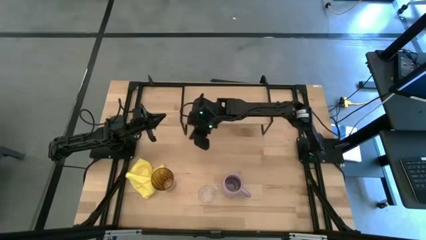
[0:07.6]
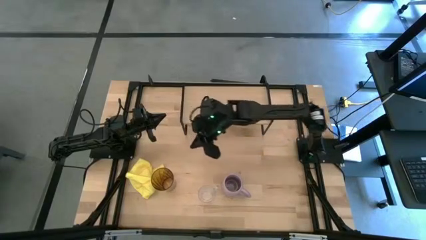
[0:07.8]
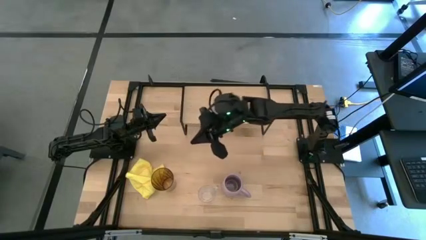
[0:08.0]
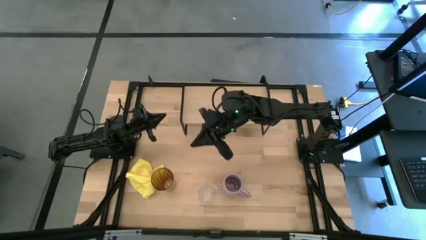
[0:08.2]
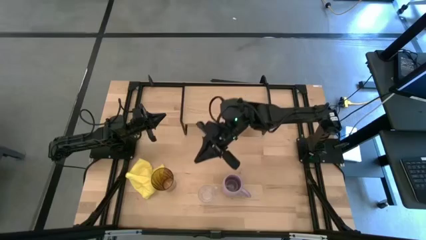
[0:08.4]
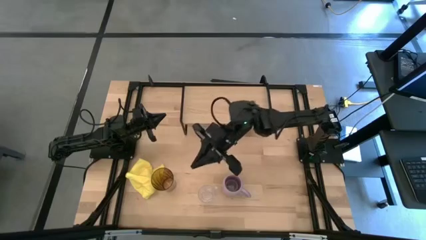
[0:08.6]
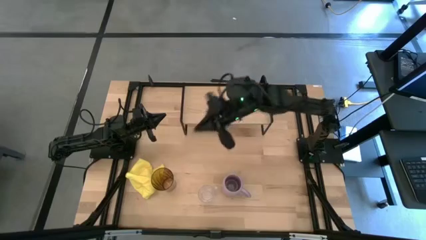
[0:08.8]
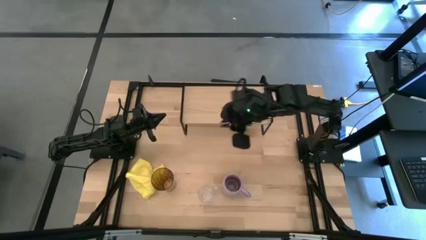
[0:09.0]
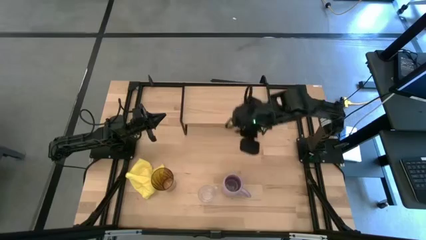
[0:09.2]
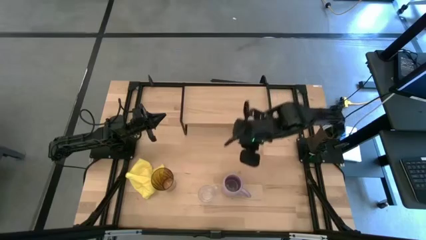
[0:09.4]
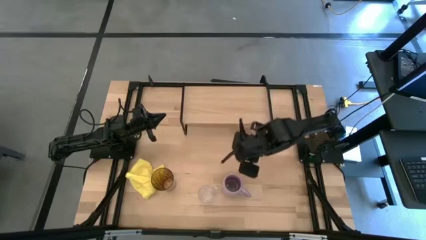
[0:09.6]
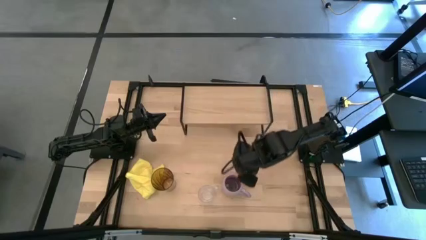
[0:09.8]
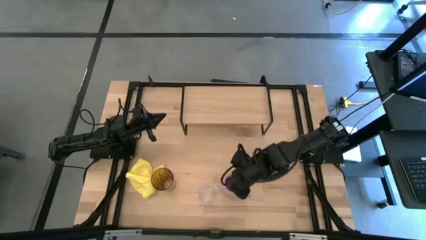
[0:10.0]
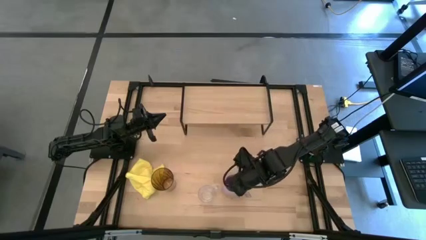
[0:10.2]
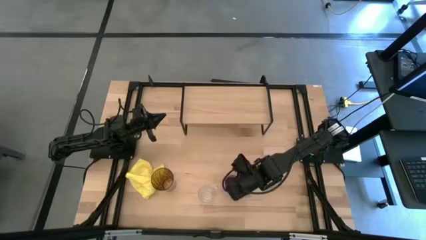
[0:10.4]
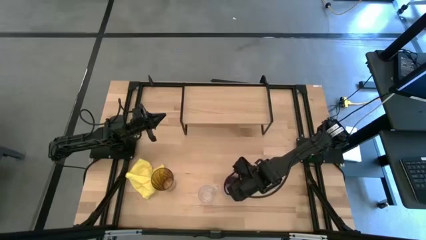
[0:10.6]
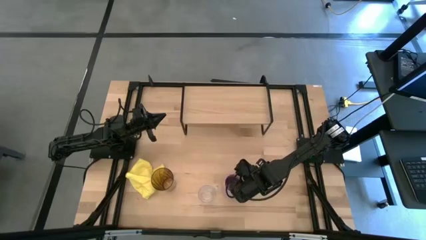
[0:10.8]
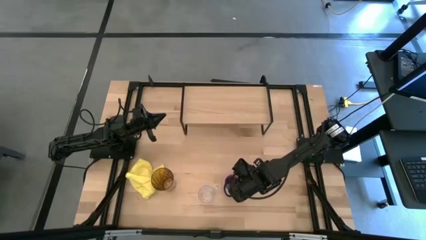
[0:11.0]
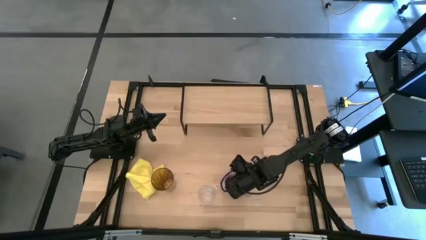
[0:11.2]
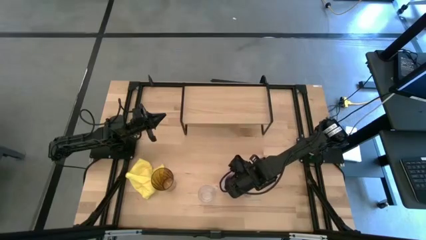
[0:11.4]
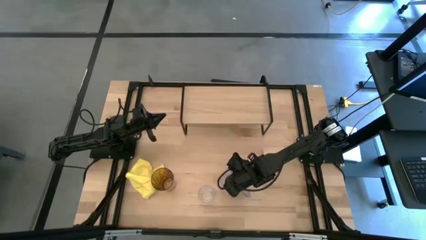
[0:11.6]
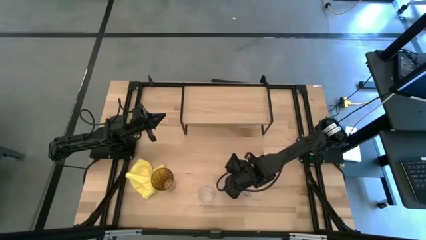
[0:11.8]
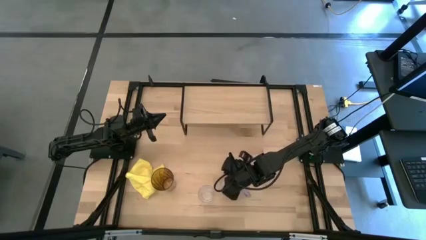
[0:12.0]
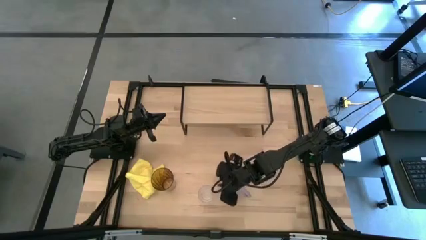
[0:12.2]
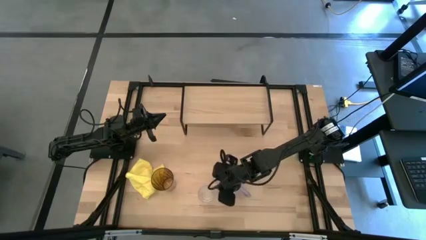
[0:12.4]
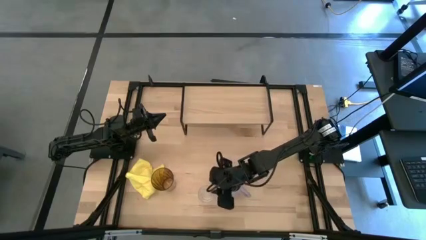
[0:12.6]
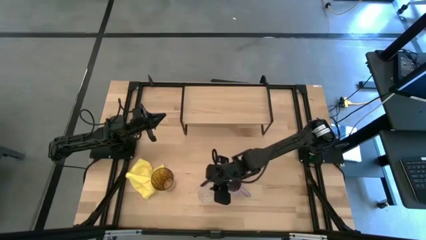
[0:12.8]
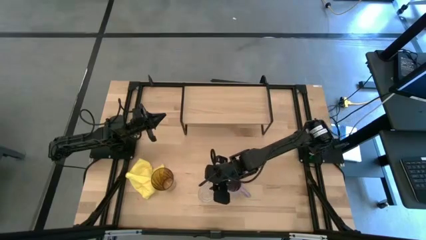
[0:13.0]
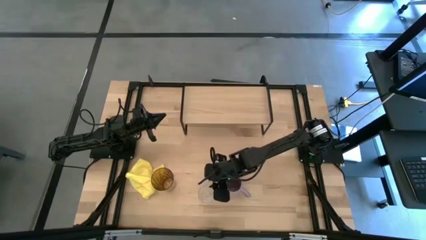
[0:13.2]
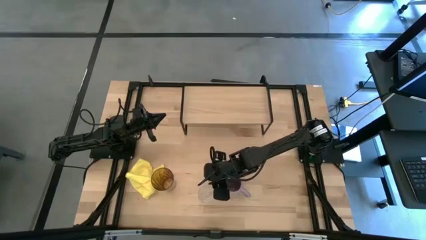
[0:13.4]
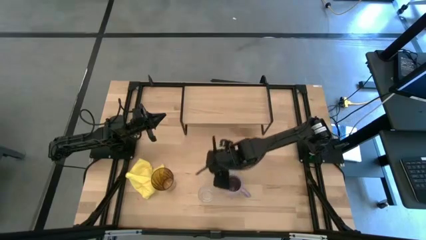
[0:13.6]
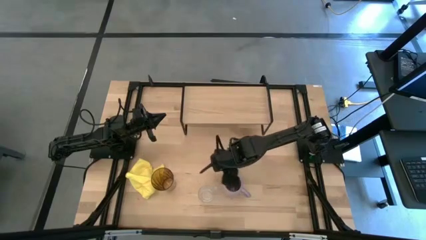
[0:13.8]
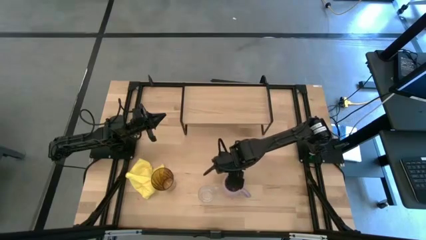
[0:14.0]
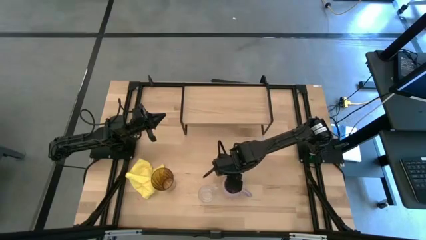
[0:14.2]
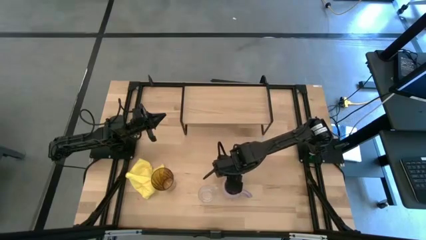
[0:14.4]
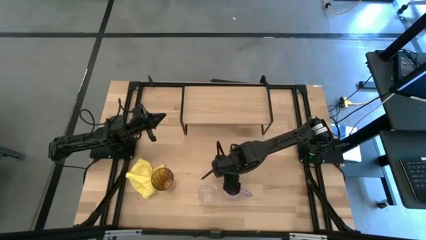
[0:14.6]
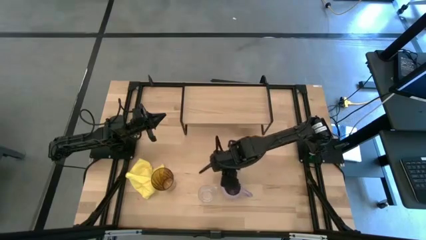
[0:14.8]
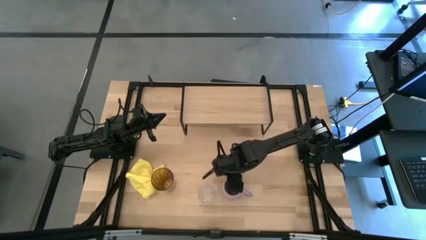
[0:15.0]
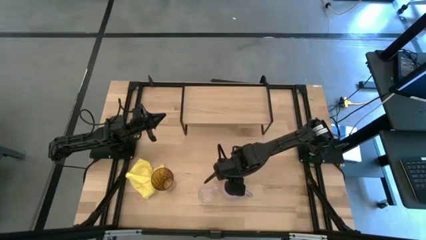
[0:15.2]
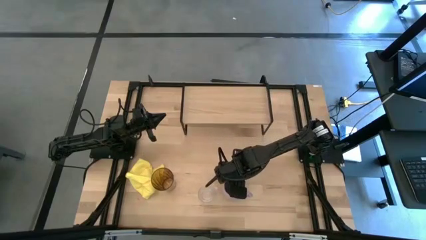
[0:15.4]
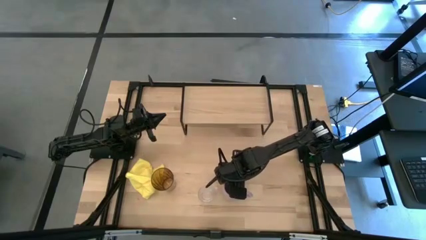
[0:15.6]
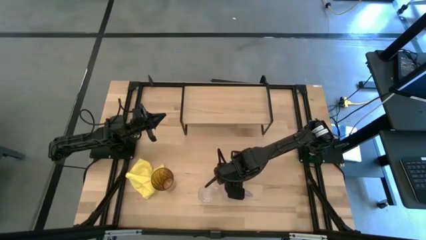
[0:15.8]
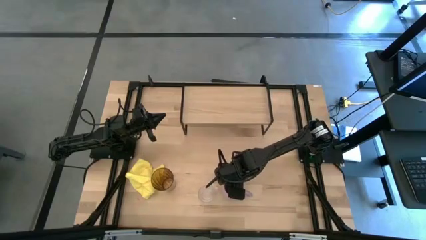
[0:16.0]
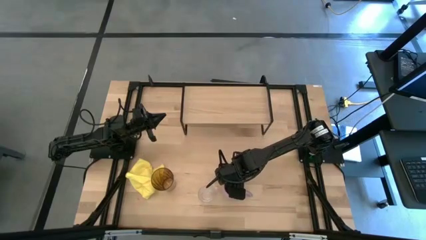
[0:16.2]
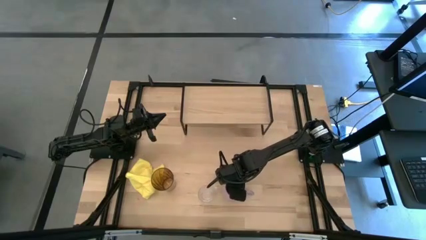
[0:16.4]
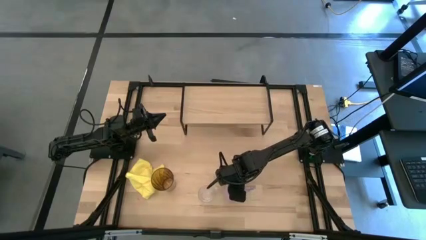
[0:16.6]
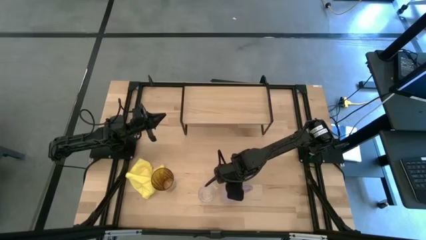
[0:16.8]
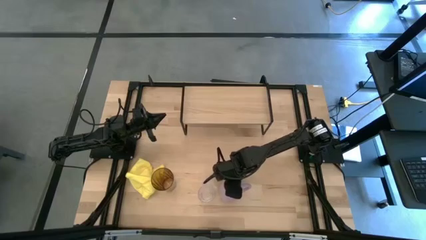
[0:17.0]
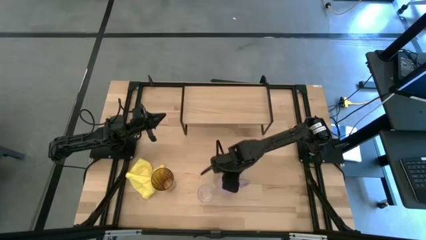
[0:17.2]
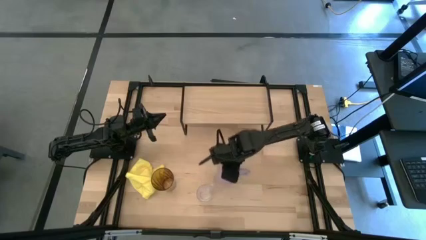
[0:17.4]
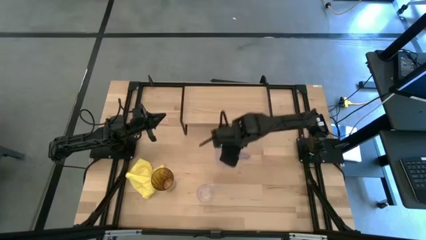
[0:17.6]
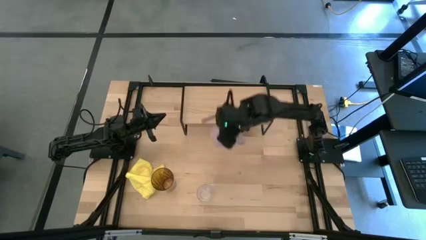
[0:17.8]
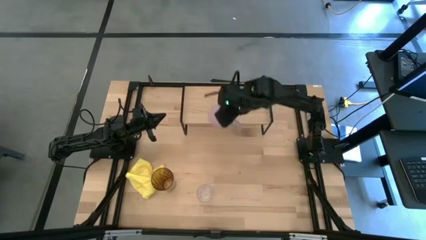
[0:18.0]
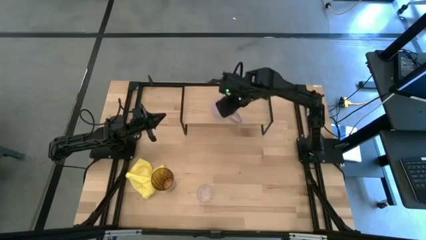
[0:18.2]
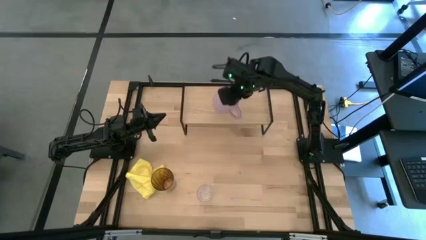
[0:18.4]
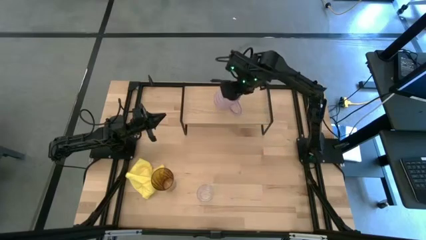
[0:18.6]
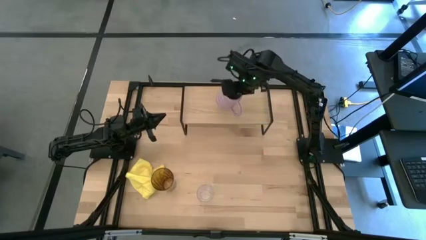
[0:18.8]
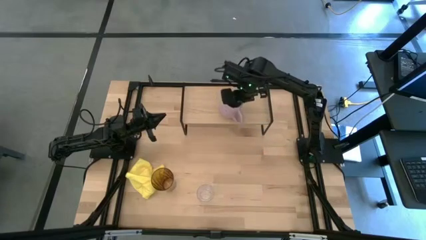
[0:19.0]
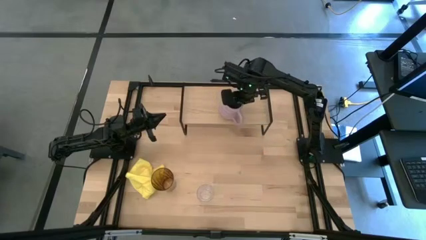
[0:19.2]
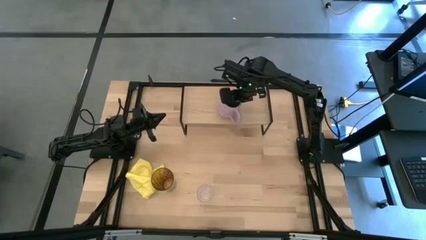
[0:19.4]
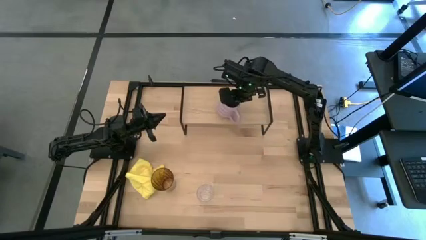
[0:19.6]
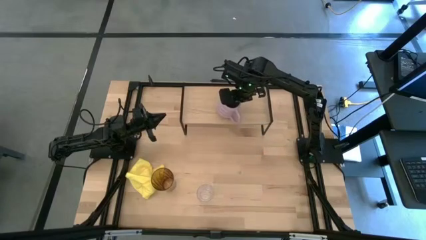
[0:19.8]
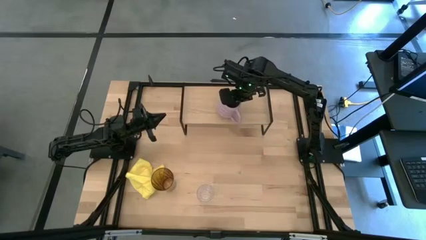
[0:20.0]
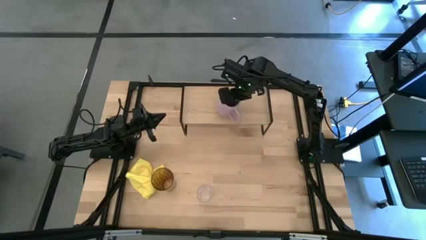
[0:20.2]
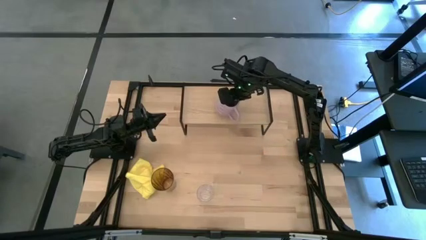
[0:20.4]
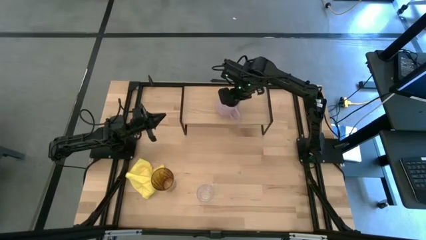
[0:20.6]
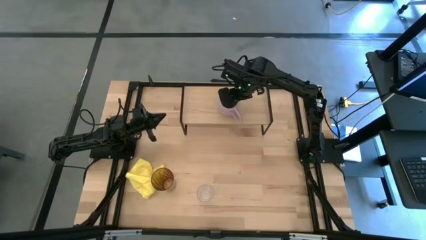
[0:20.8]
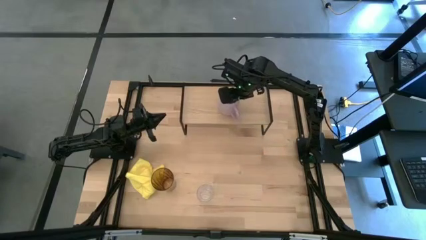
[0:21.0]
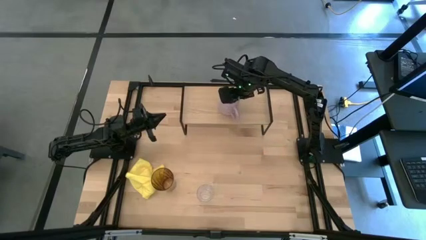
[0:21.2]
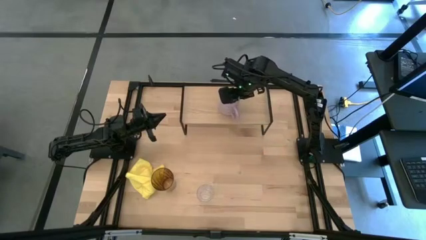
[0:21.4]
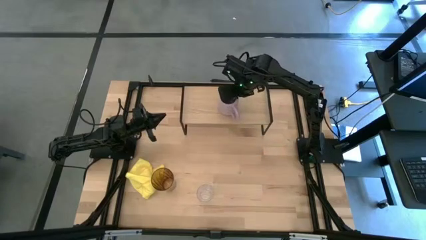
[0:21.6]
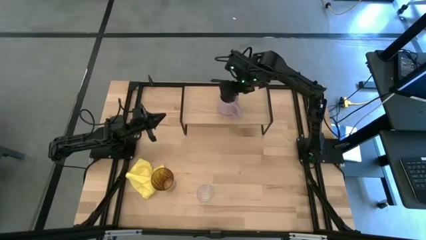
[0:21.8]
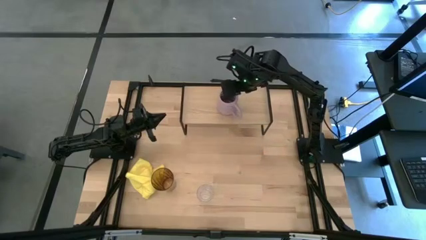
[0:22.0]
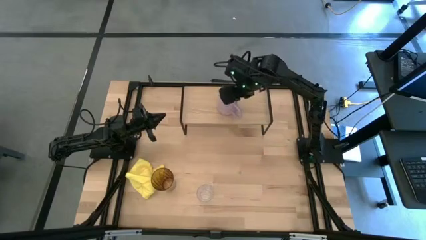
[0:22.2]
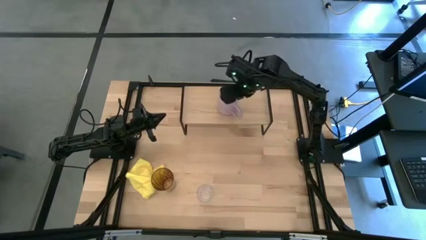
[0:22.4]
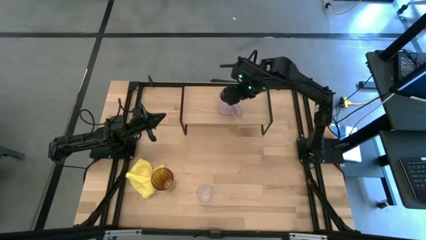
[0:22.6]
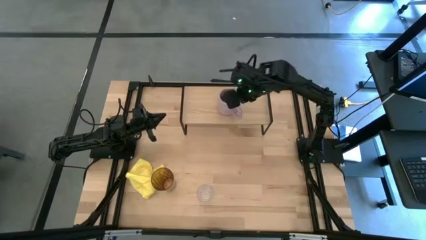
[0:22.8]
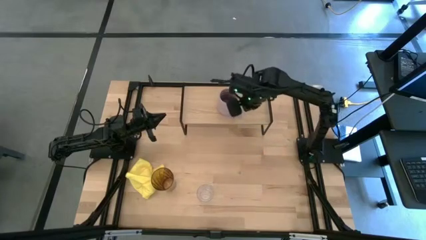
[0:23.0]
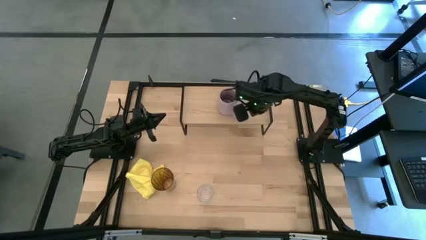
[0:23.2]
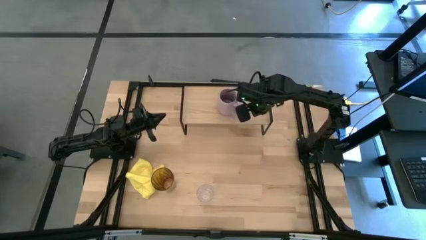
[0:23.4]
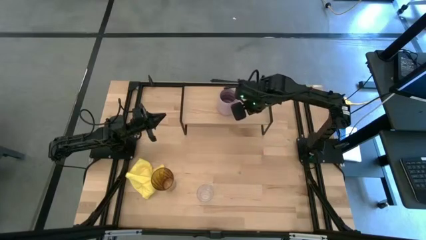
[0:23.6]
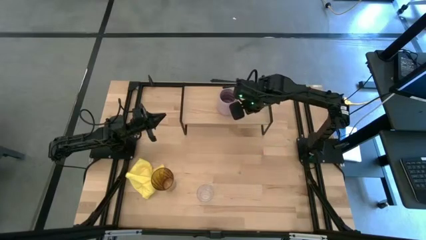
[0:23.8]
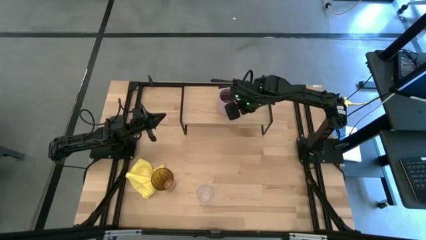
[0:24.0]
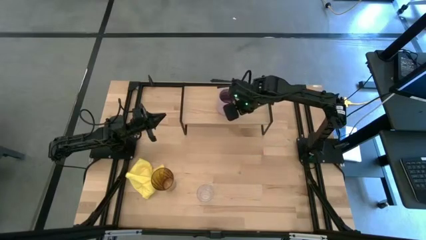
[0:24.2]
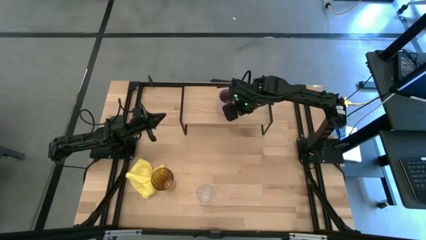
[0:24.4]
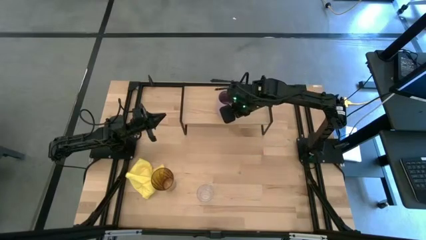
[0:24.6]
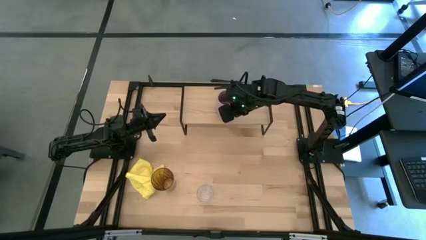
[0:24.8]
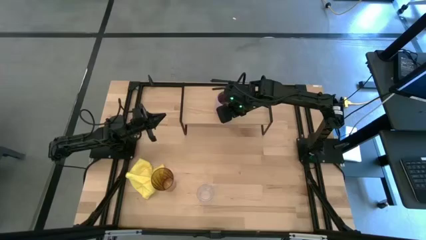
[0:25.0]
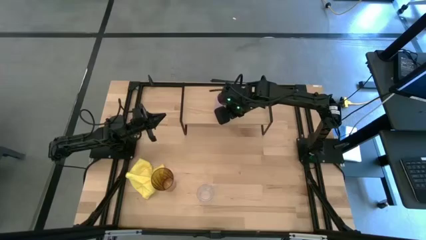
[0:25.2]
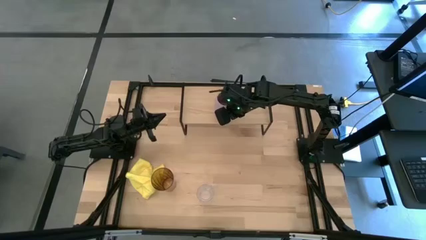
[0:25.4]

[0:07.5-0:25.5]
Task: Stack small to large cups/mugs on shelf
Put the purple mug on the shelf
